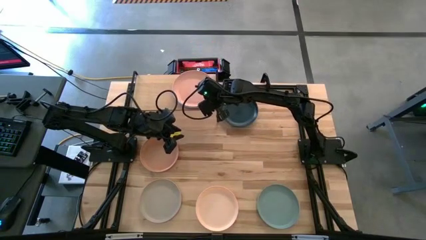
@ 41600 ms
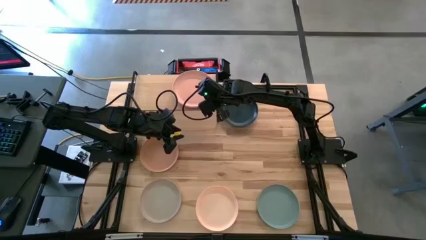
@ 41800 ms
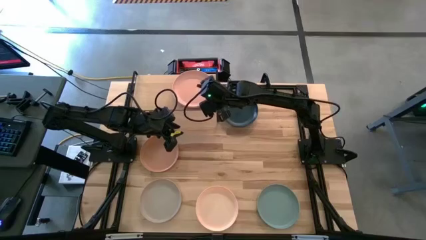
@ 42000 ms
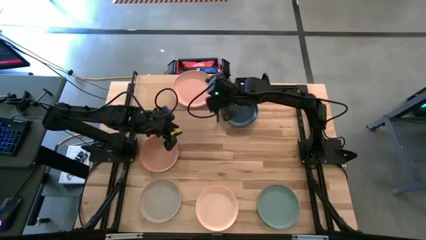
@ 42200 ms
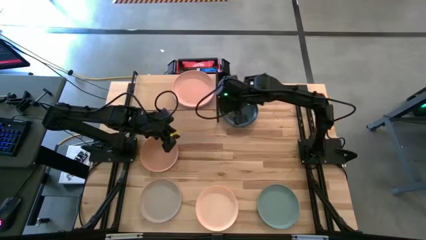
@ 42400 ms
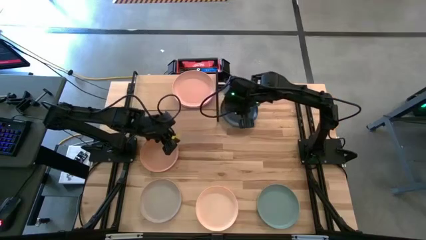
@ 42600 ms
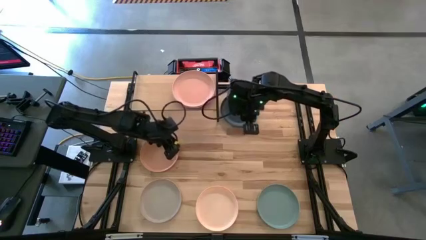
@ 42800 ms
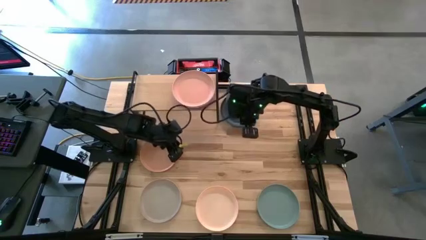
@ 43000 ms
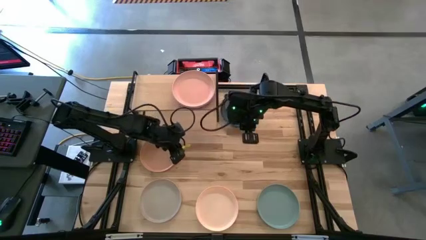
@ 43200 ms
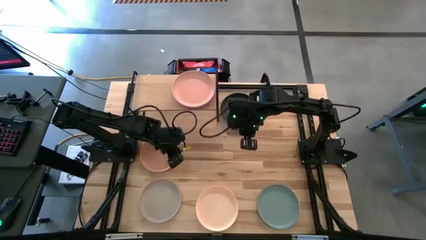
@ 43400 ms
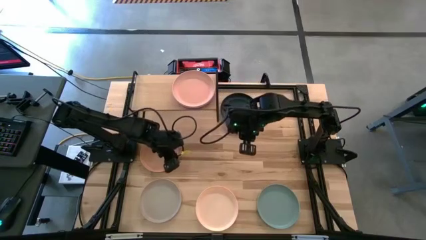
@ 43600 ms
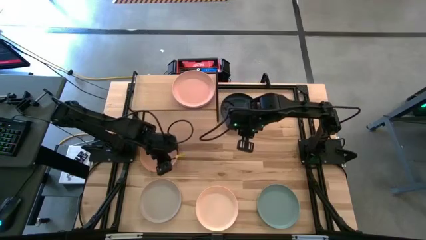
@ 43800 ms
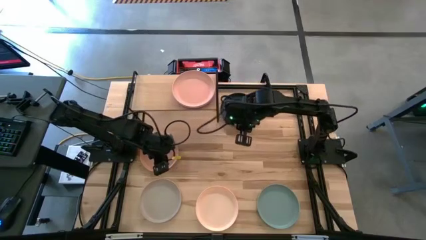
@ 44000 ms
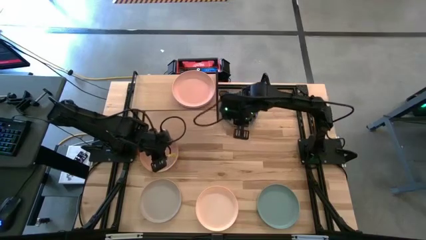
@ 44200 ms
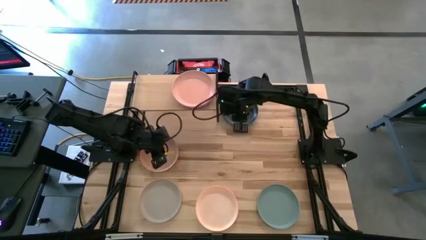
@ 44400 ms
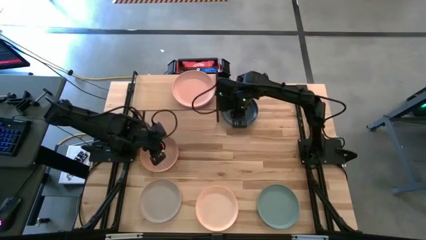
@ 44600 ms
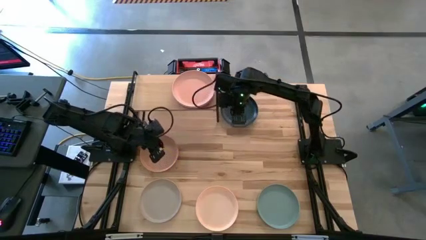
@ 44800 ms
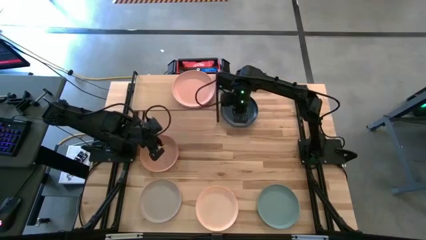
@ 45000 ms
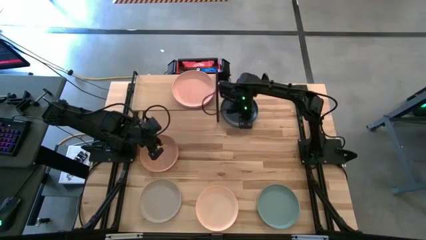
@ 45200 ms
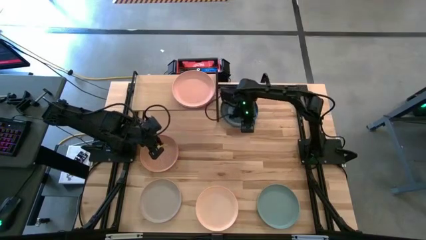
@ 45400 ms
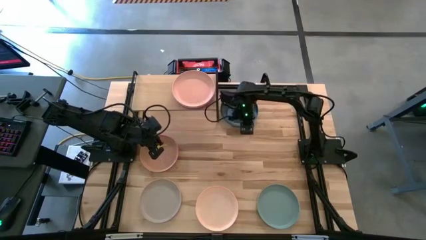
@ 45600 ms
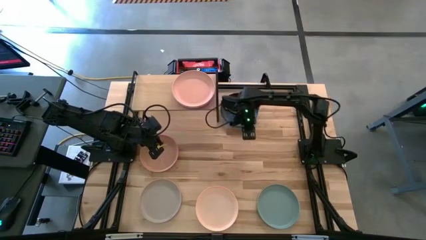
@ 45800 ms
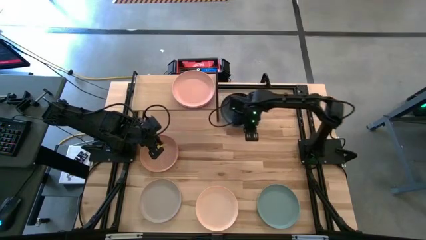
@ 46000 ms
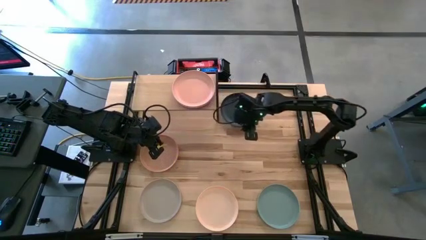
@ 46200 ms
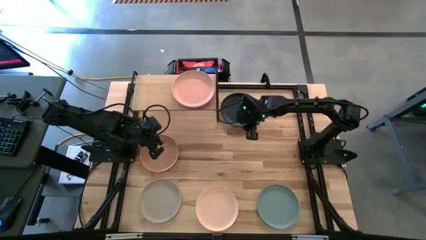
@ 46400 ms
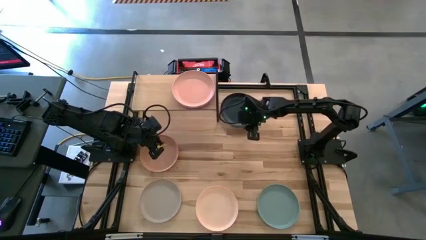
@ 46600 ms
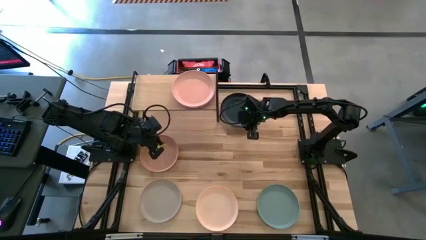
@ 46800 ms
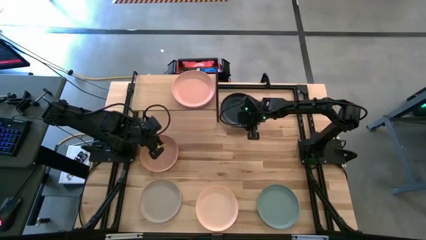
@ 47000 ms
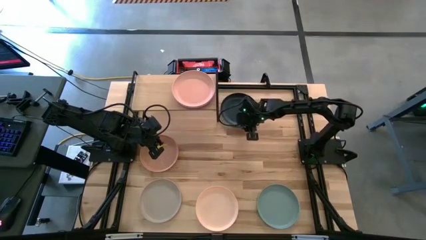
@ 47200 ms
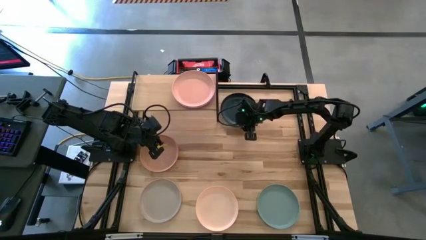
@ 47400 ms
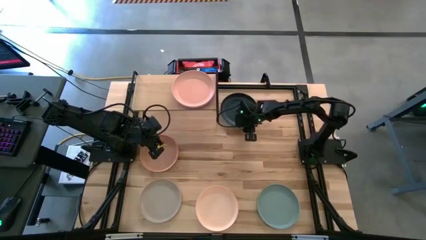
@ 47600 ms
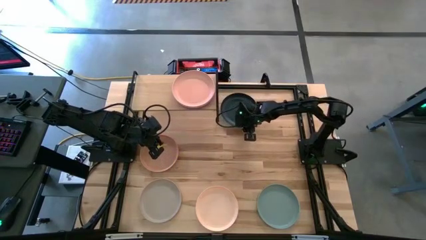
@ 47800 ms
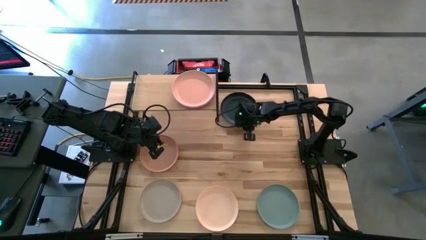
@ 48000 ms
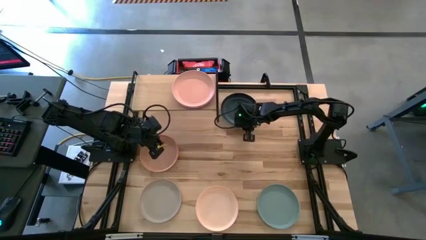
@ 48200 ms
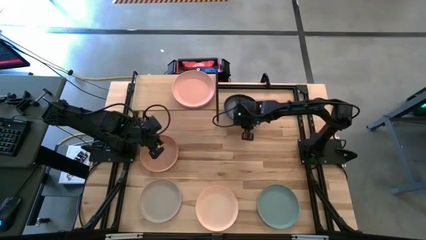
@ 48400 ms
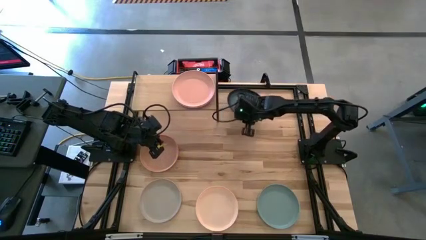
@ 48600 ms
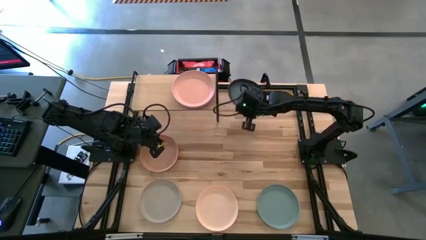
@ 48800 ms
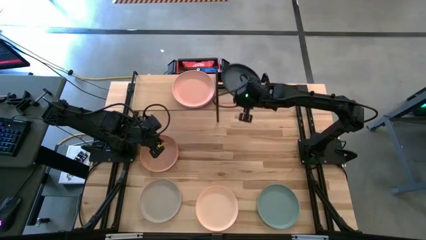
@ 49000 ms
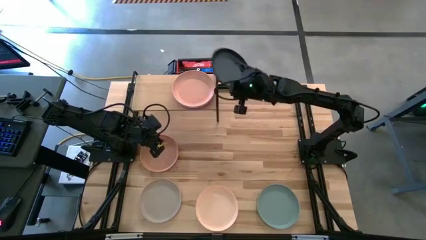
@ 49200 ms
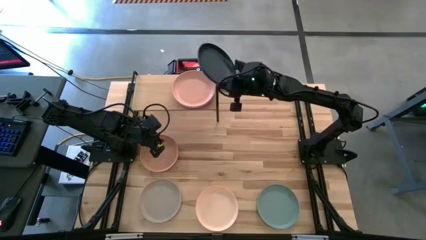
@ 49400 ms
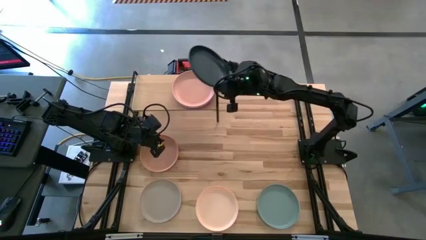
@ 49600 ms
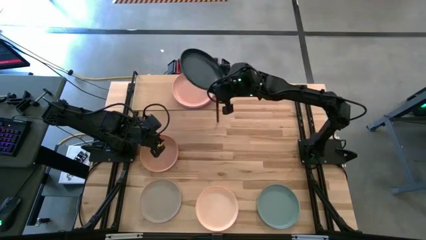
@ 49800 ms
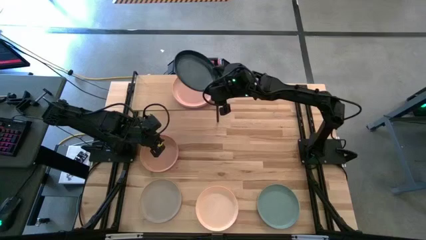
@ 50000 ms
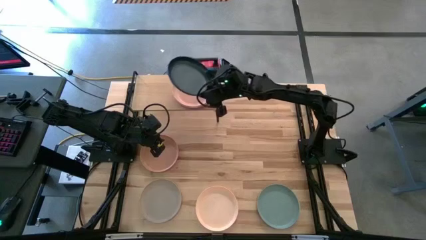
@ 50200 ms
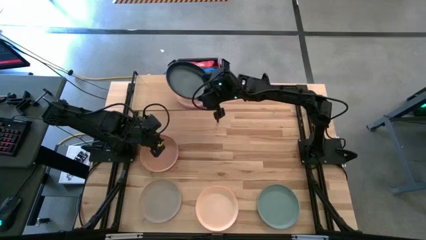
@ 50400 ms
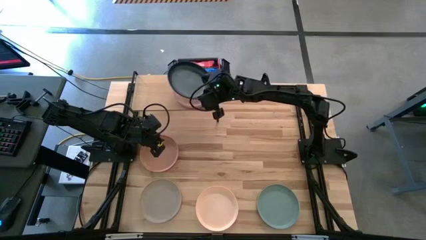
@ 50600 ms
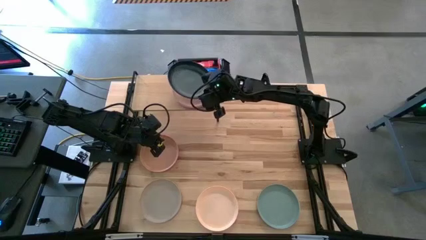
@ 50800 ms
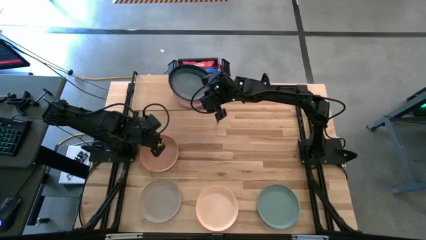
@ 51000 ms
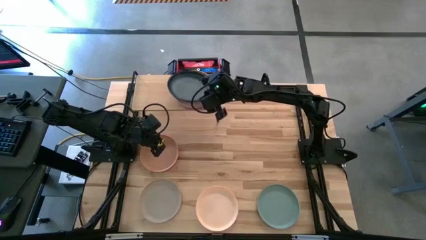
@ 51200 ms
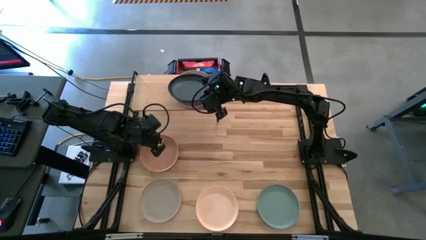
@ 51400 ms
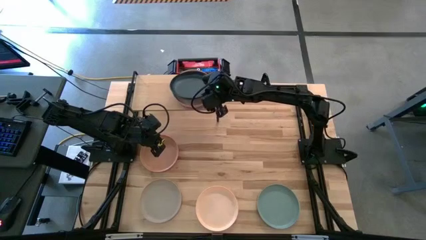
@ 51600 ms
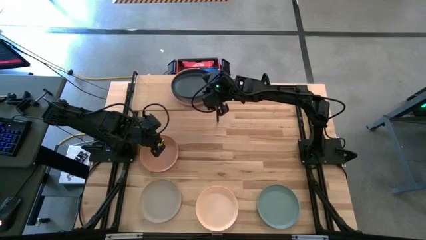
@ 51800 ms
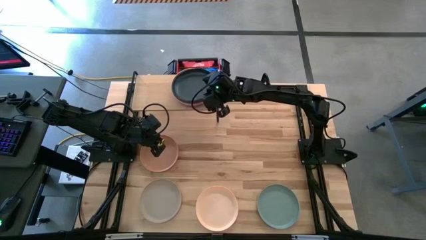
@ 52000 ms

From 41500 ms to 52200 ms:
Task: Place and stack plates onto a shelf
Stack the black plate on top of the light orange plate on the shelf

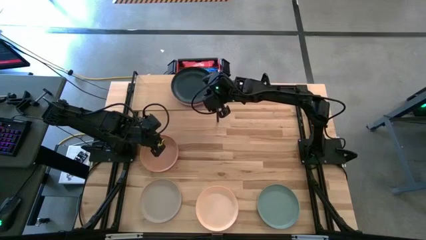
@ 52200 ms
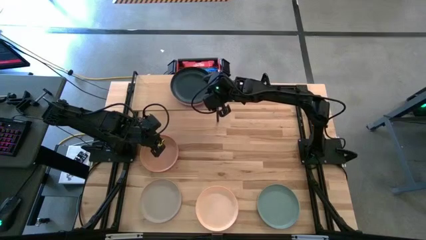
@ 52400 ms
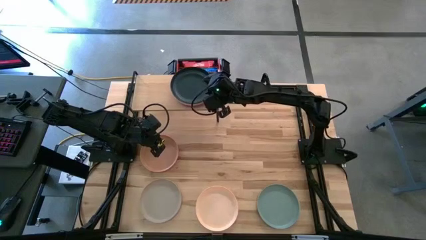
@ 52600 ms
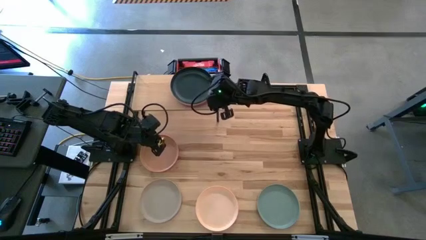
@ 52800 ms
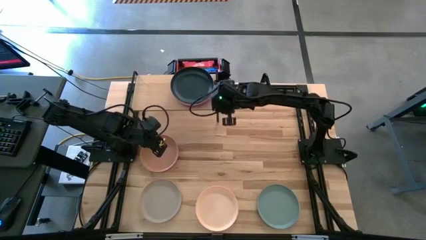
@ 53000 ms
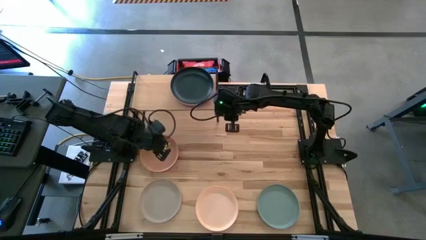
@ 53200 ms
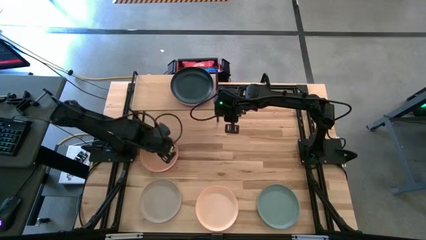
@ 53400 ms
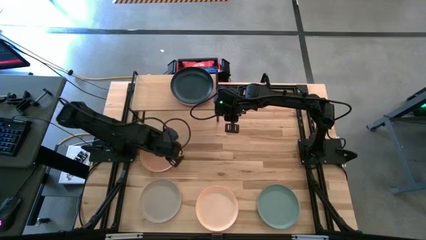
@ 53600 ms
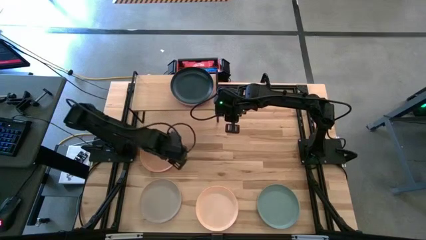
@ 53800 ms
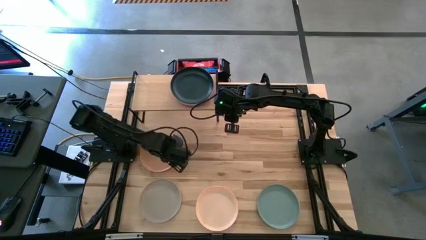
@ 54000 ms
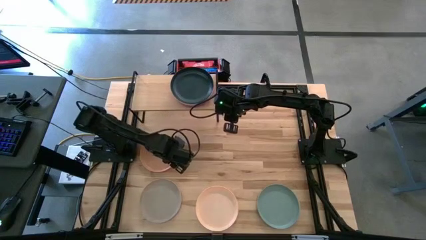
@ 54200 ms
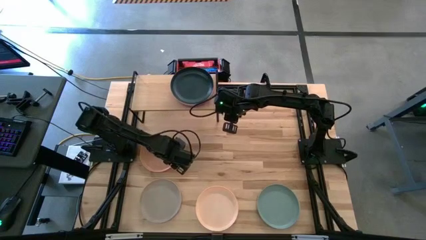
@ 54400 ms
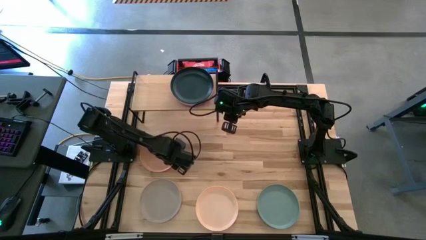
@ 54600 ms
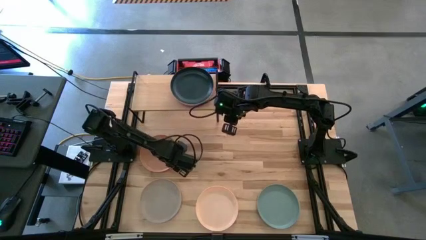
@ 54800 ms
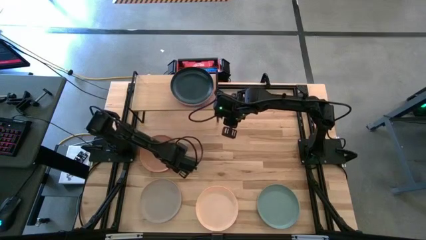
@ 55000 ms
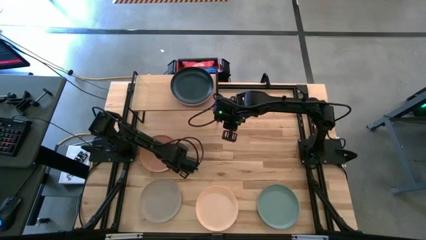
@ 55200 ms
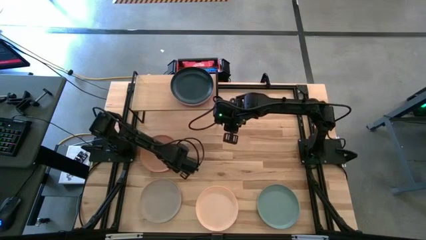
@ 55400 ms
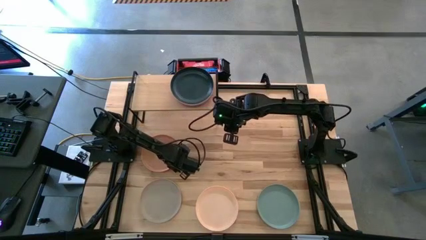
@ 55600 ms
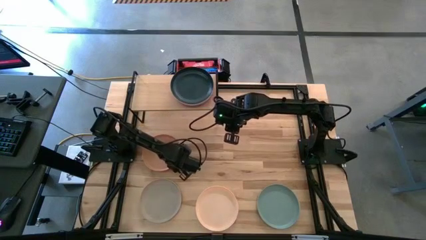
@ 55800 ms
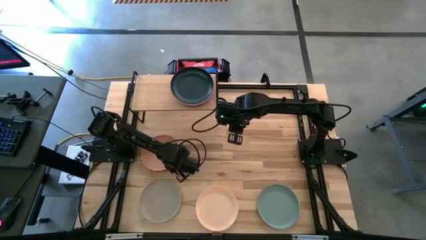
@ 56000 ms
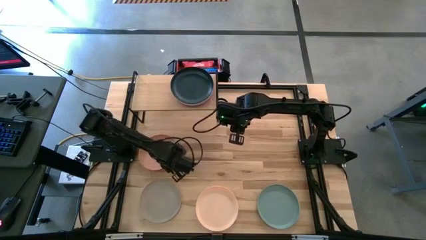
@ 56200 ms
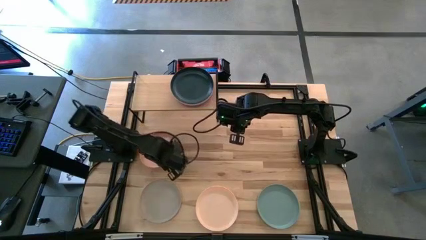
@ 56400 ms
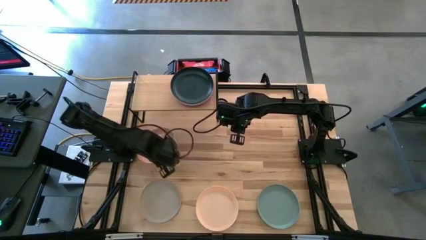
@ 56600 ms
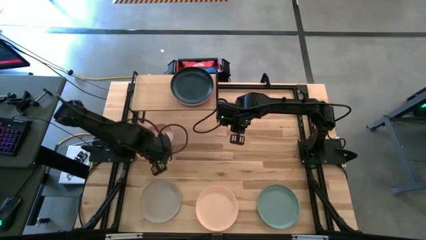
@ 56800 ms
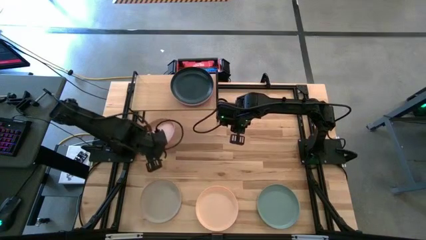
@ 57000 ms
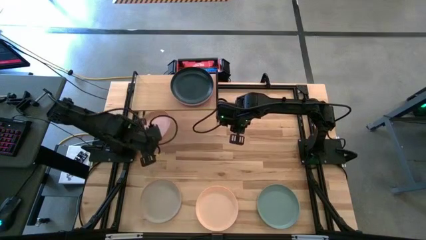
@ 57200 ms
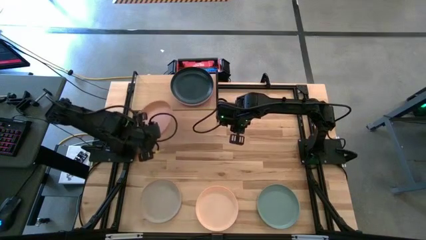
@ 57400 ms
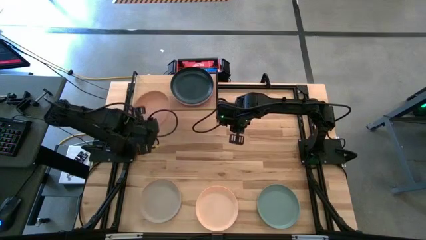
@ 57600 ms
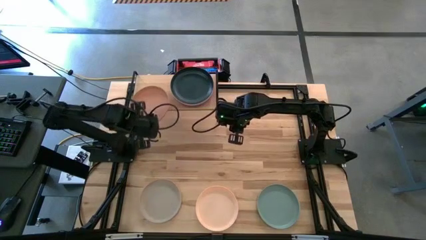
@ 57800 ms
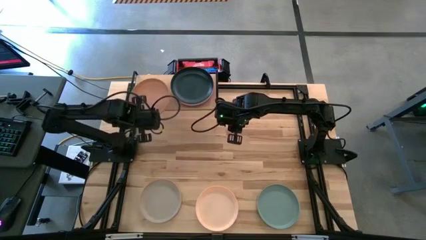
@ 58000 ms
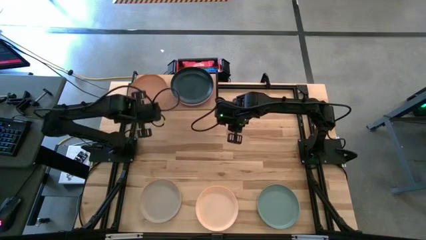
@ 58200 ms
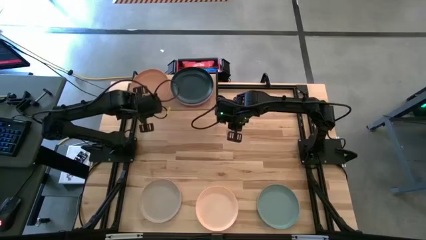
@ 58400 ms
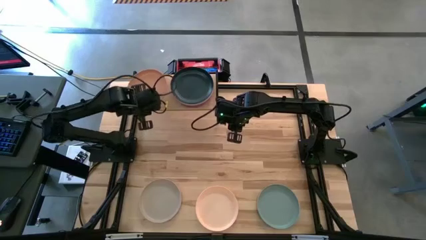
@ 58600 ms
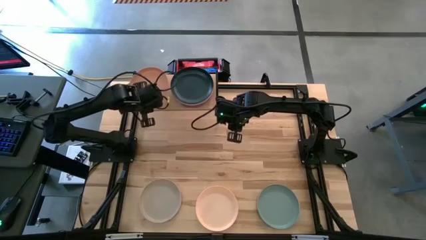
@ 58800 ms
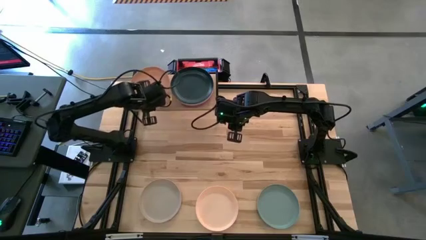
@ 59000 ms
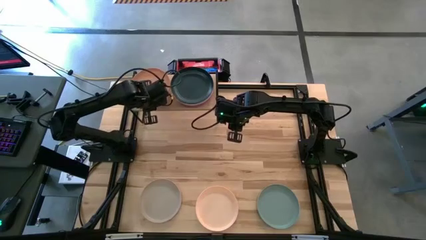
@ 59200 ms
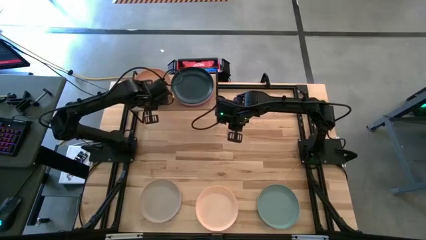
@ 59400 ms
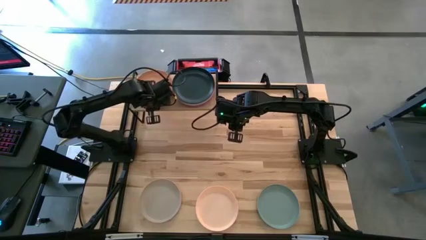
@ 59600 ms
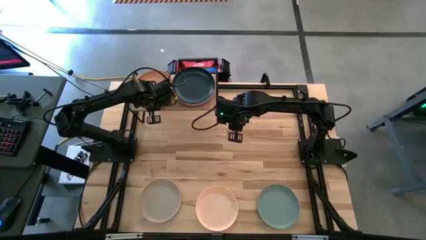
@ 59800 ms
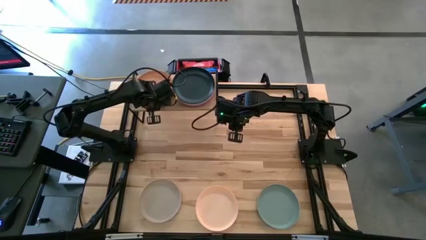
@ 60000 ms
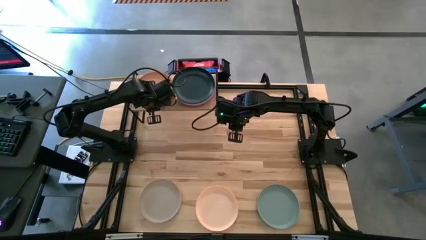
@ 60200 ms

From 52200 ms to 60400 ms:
Put the brown plate on the shelf
